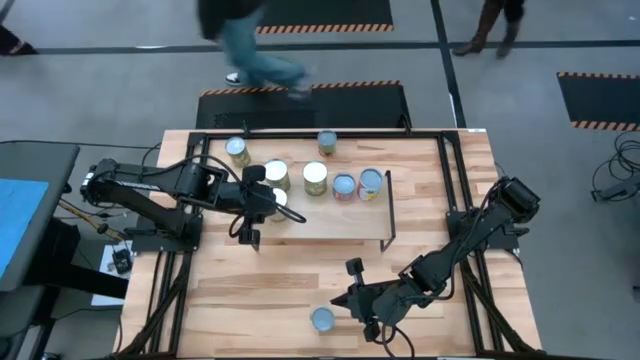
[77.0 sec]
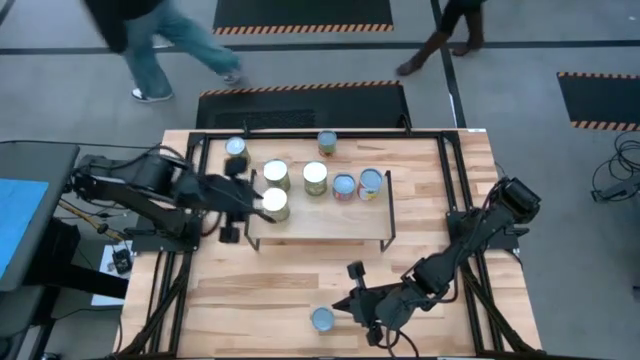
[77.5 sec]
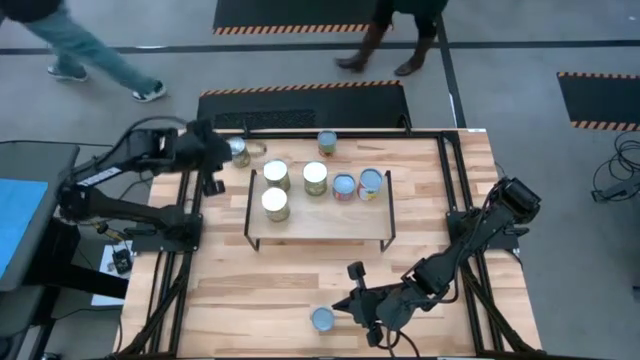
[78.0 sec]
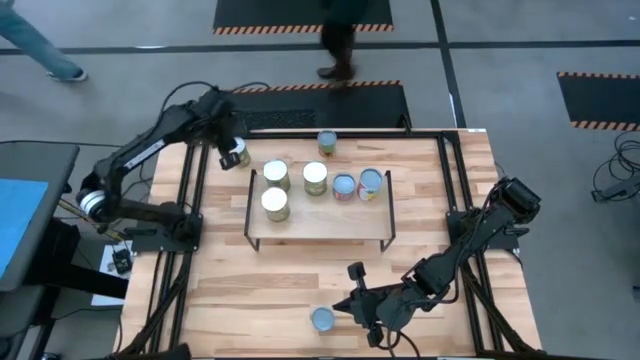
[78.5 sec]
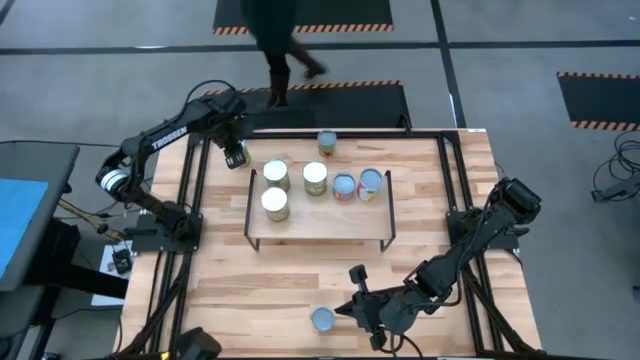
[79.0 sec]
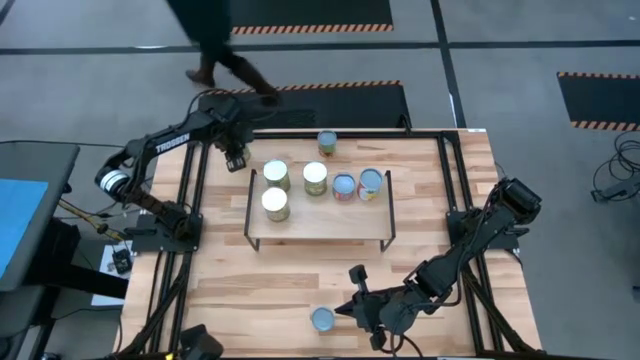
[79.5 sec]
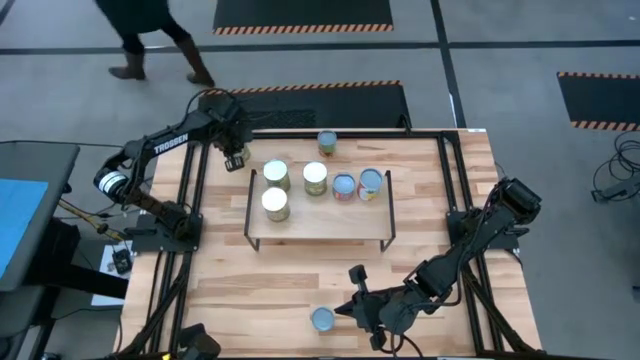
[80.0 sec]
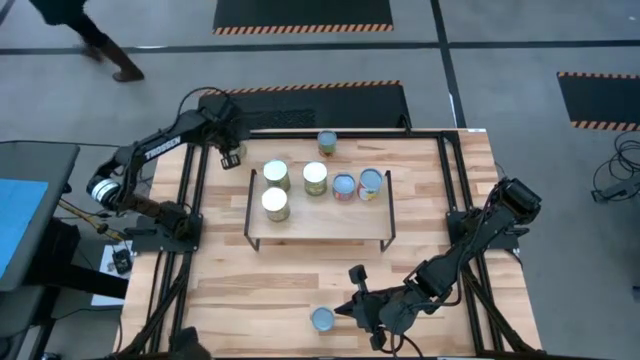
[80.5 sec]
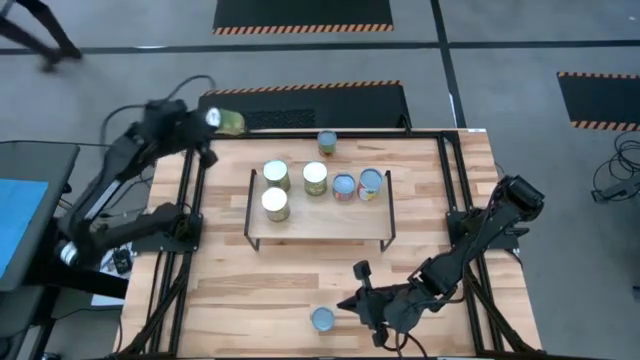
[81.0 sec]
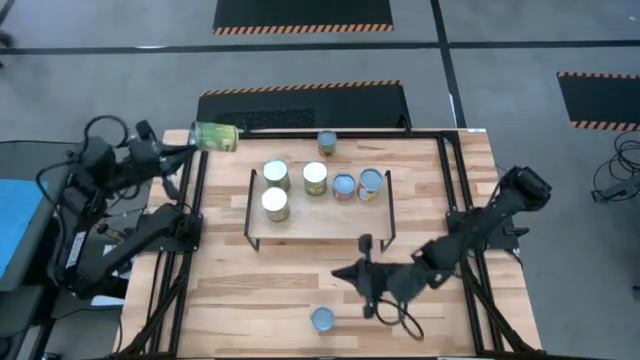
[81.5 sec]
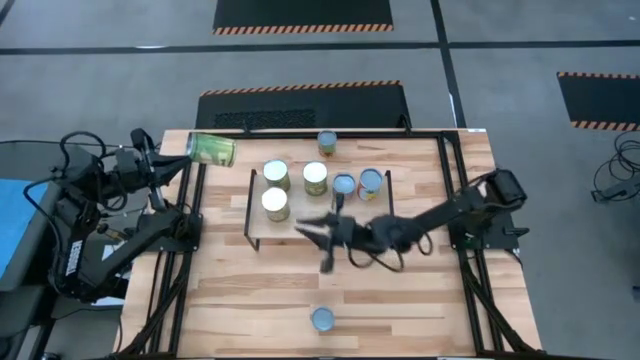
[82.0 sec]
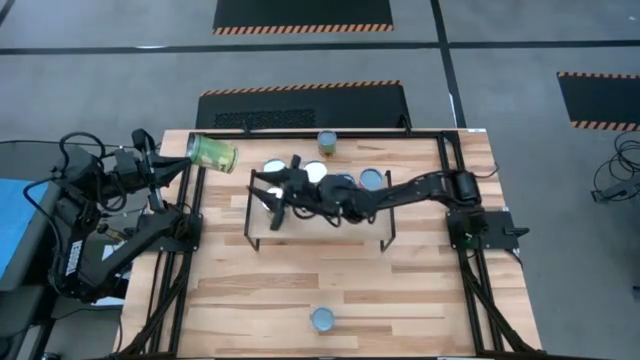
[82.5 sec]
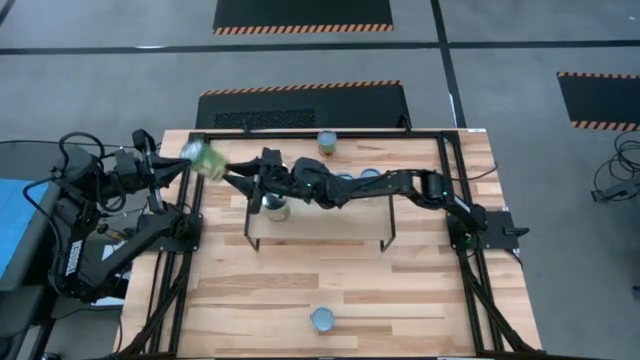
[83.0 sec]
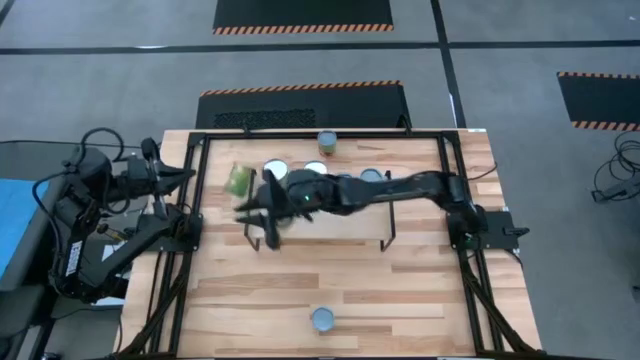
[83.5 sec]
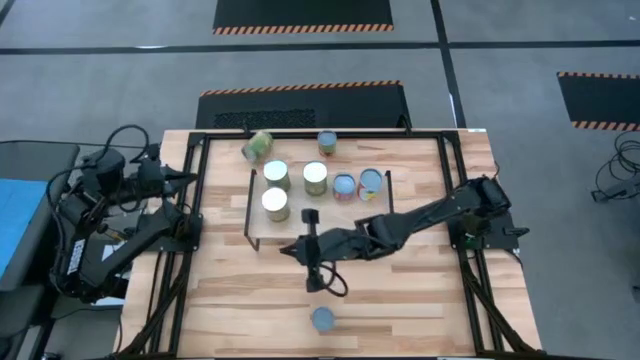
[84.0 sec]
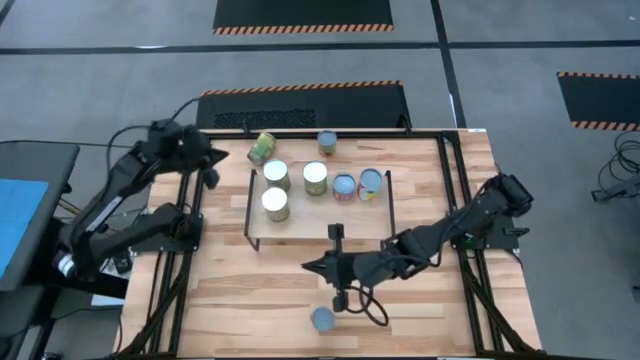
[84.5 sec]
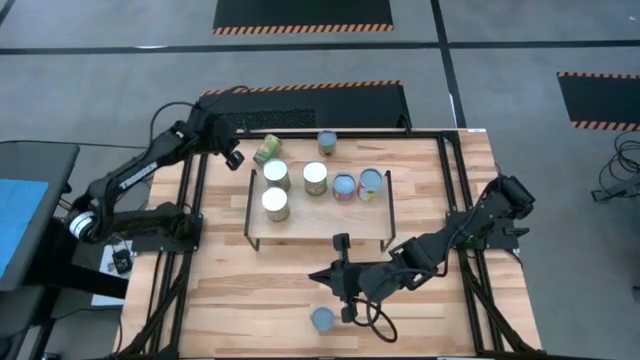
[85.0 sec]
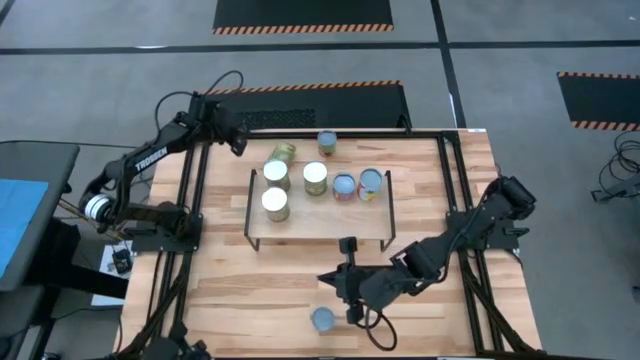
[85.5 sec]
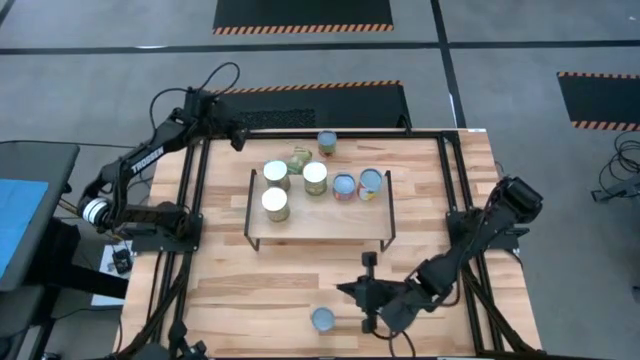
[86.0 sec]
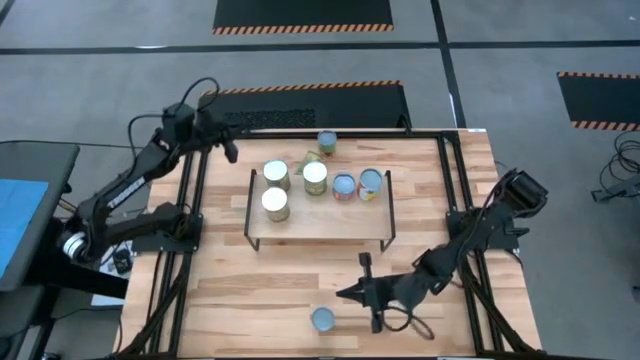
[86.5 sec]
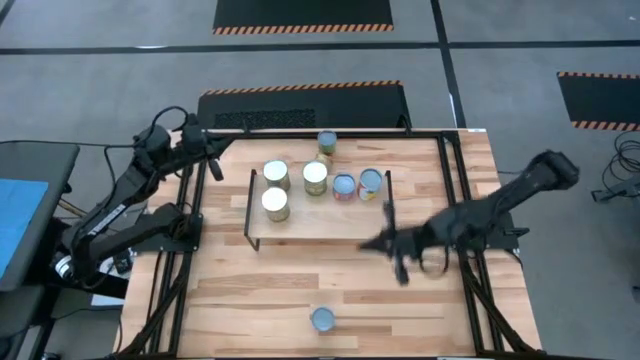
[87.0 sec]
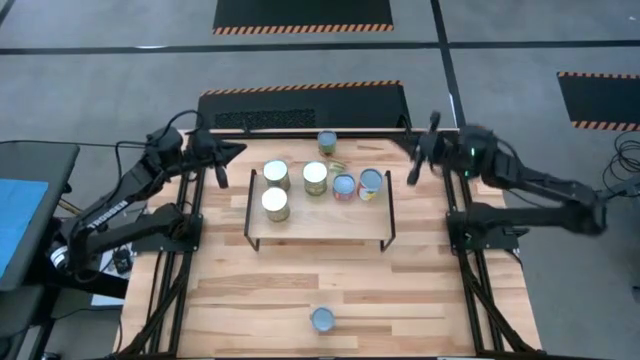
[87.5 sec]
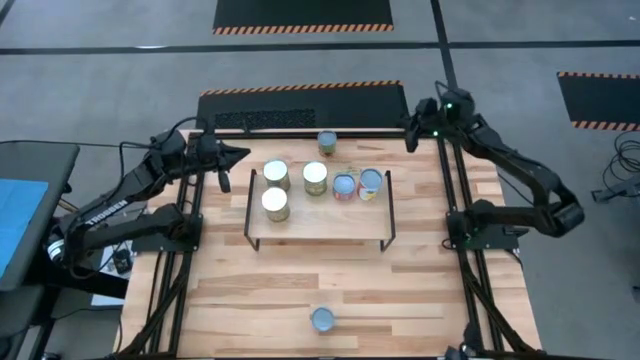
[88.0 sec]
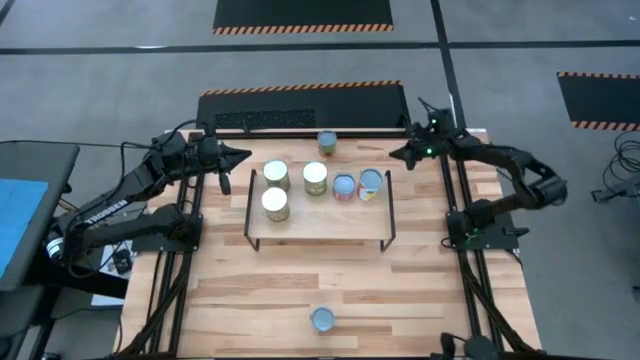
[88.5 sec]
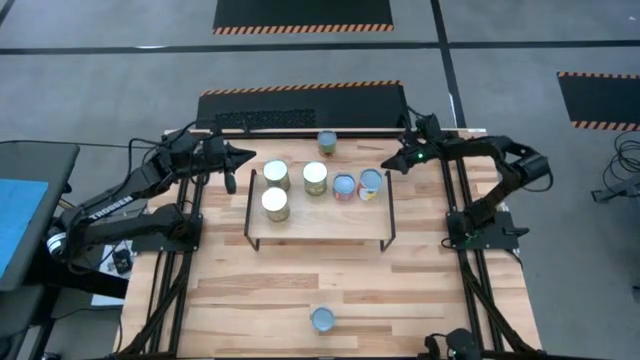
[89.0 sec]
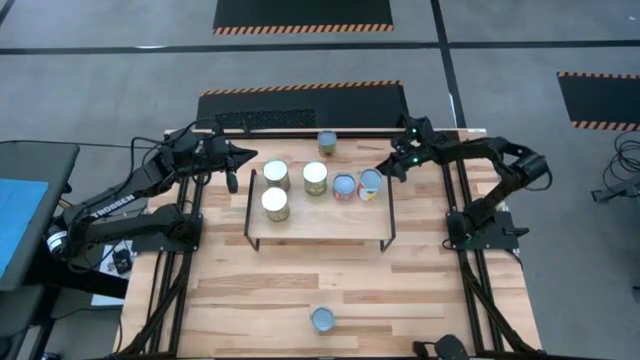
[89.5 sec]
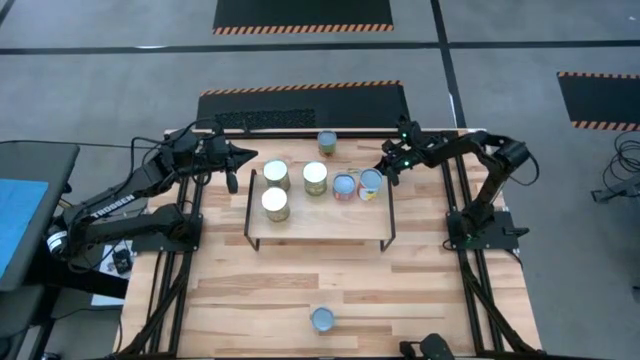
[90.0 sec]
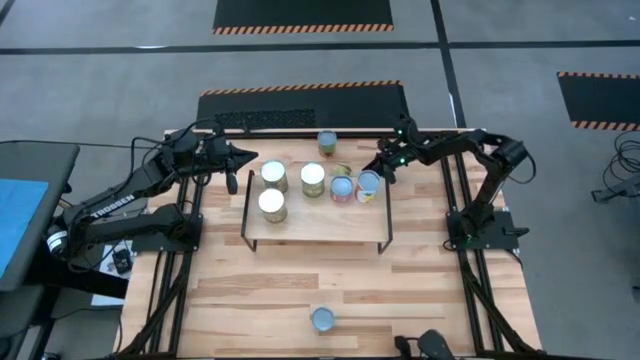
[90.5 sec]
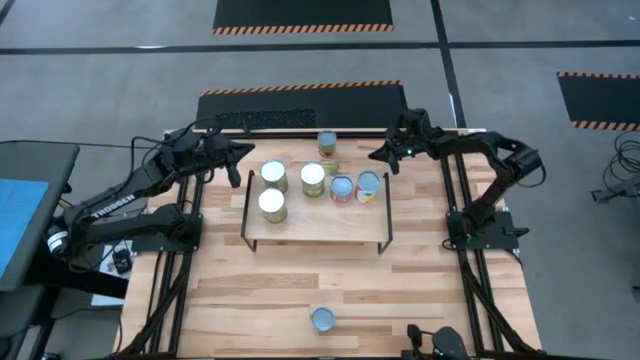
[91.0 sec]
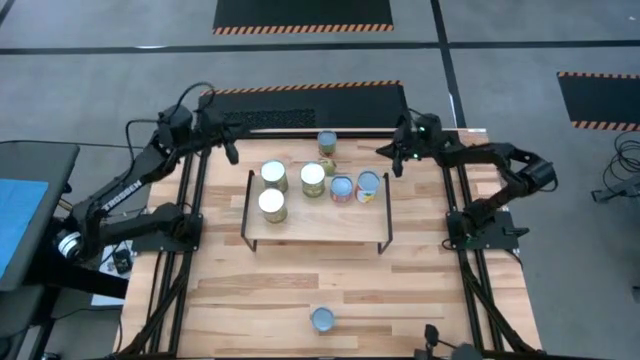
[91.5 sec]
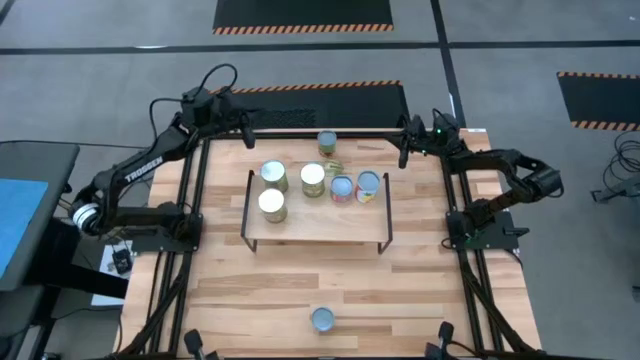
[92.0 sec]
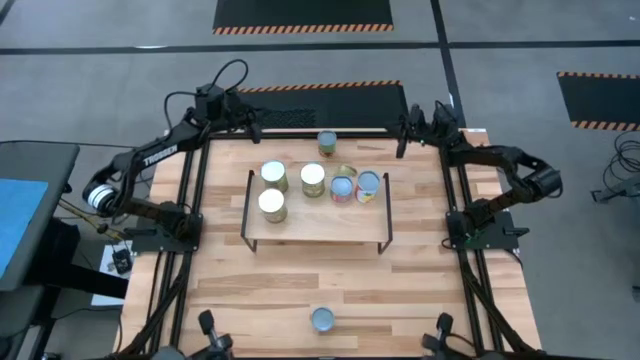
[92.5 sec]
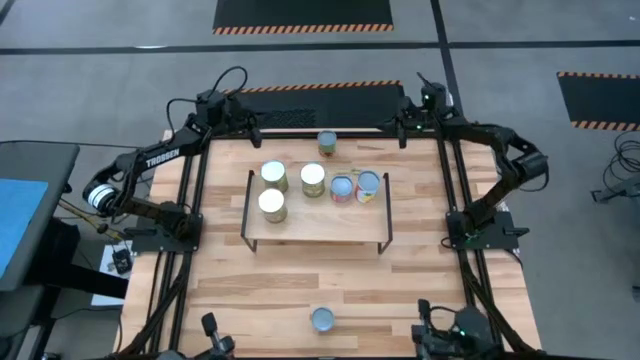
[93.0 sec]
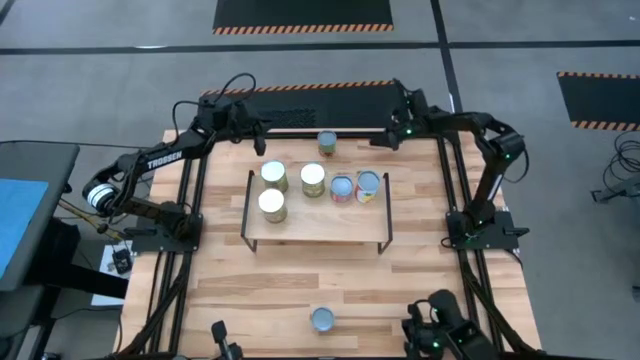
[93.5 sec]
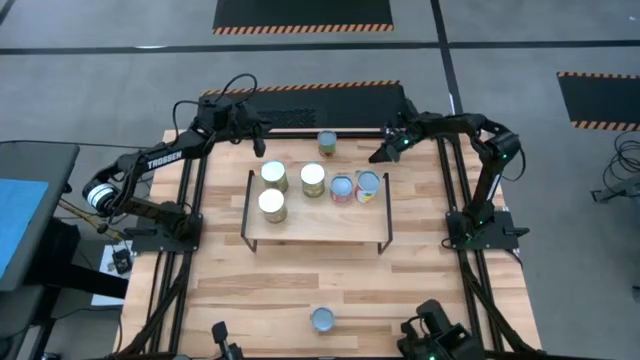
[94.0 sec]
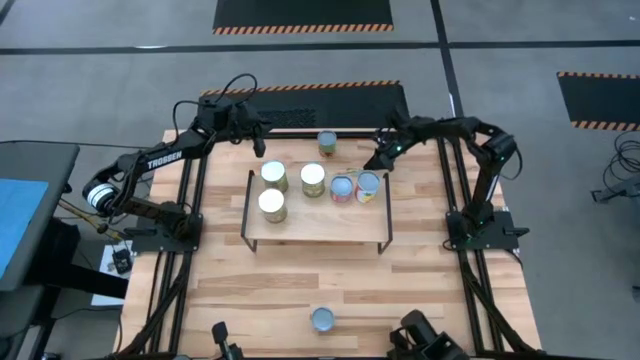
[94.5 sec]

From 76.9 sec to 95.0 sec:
Task: Pick and place cans onto a shelf
Put the canned pears on the shelf

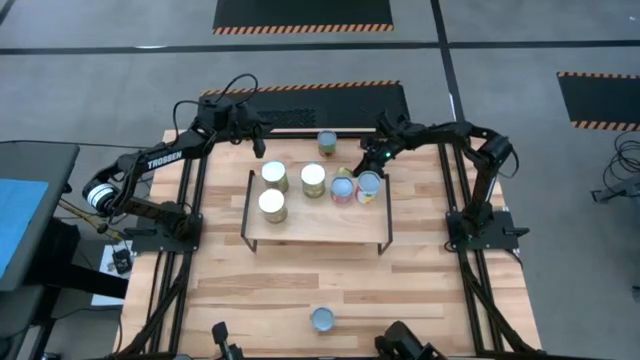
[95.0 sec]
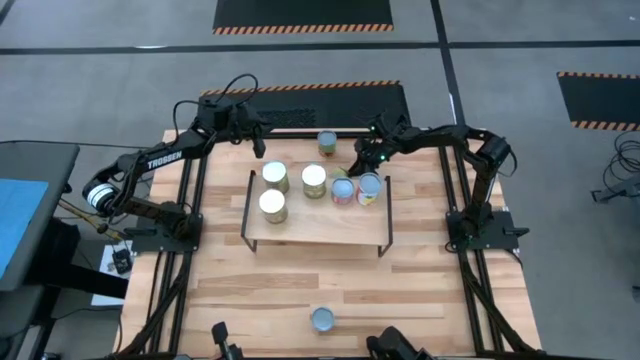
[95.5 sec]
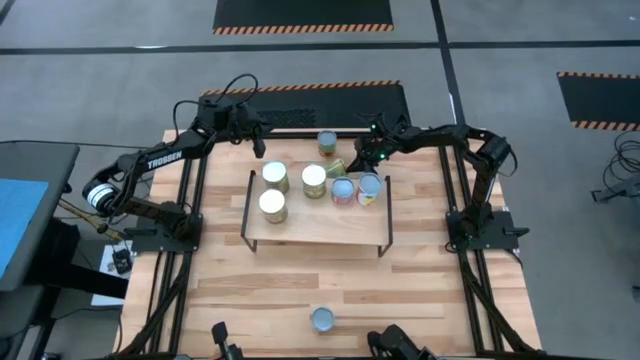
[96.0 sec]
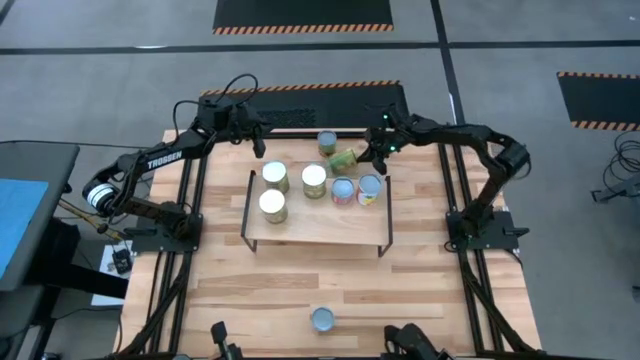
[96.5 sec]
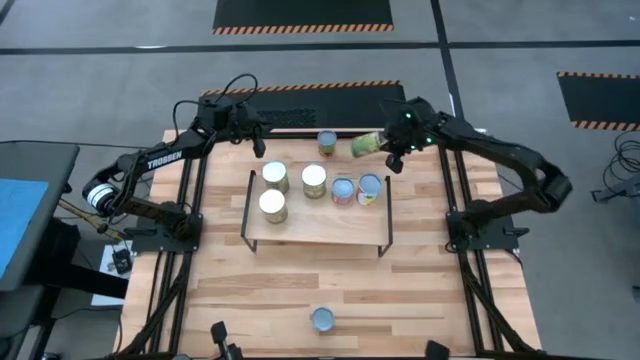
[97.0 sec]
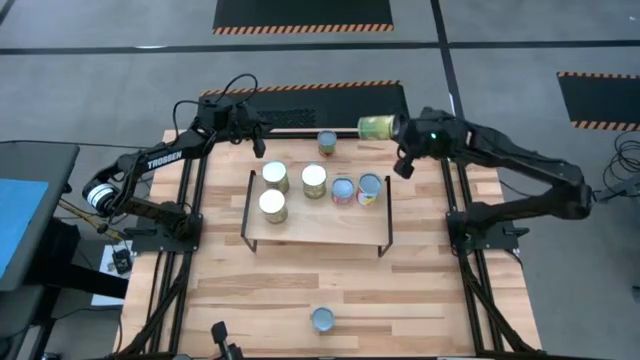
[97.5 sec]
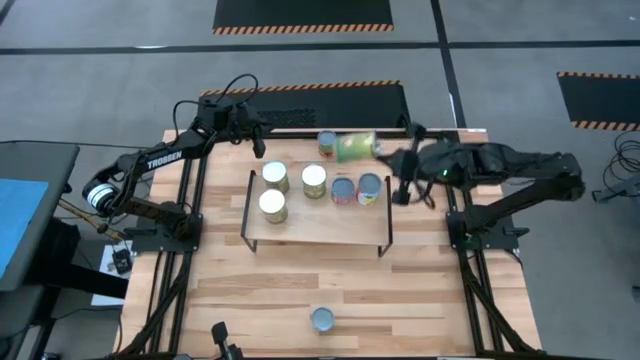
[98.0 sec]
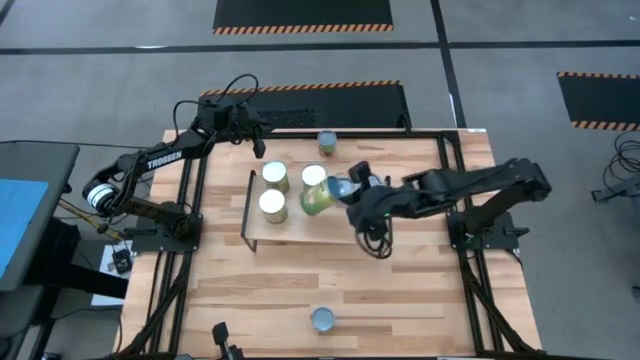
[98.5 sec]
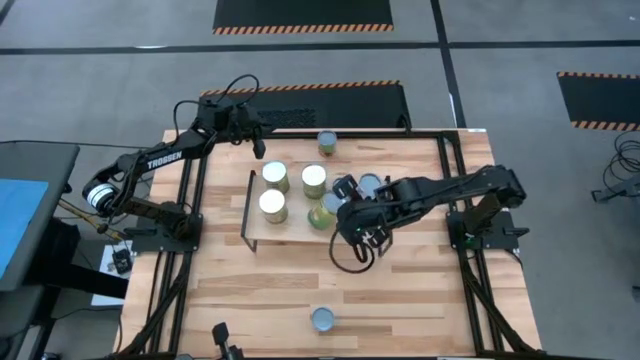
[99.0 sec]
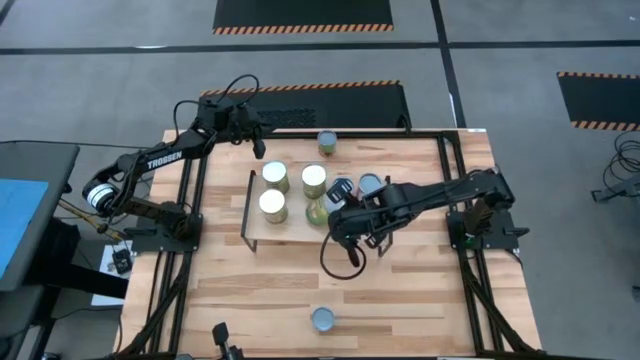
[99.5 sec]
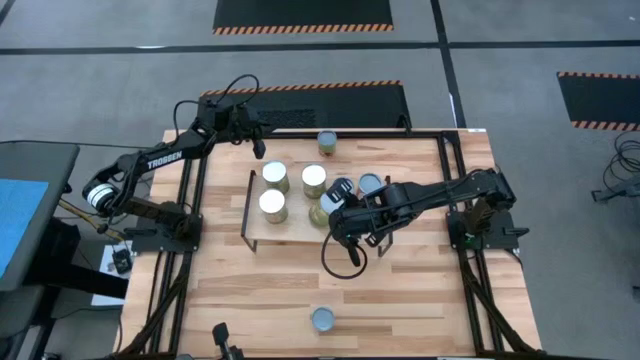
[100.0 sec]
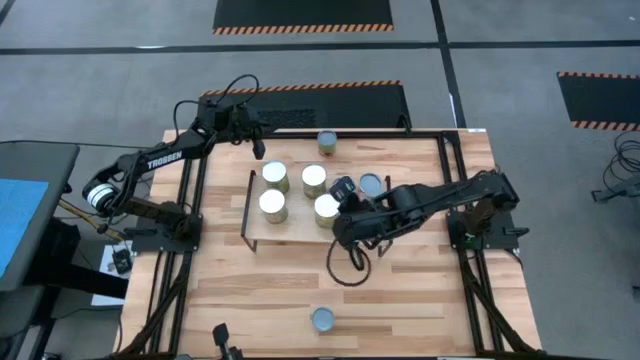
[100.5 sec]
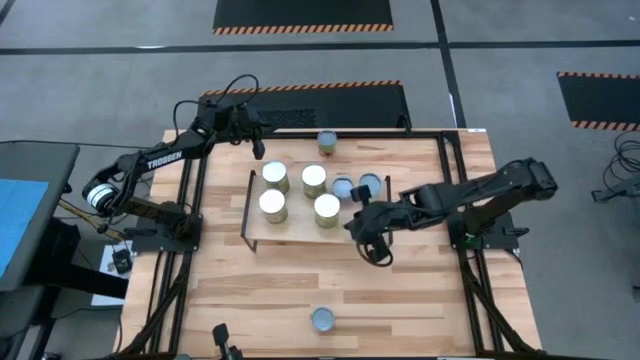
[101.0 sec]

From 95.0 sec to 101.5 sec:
Put the canned pears on the shelf aligned with the other canned pears
